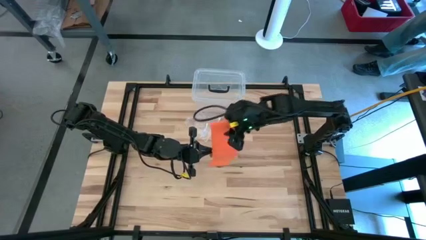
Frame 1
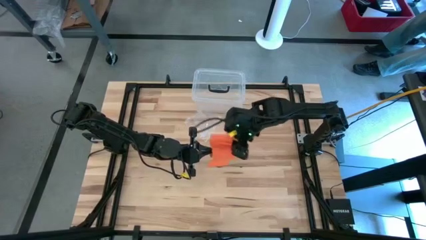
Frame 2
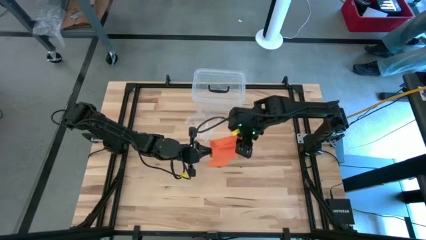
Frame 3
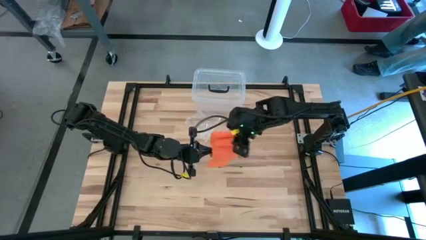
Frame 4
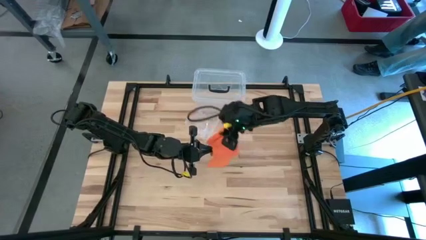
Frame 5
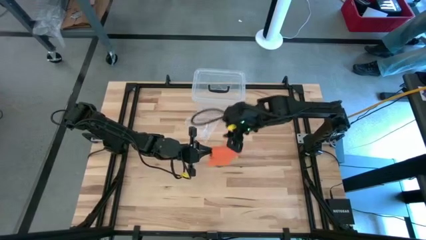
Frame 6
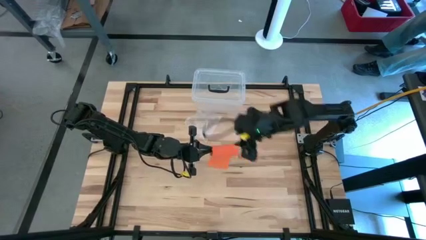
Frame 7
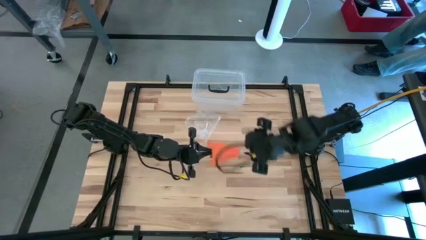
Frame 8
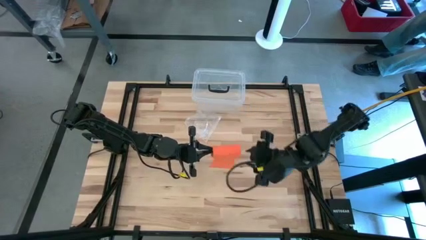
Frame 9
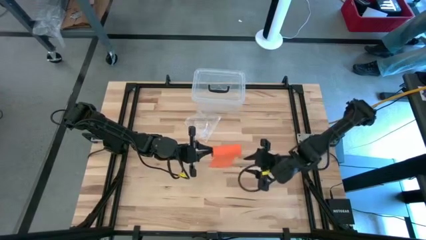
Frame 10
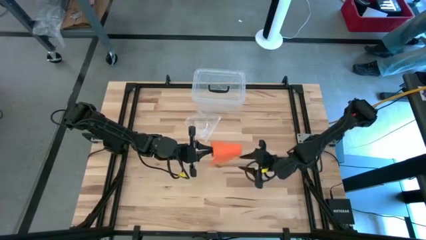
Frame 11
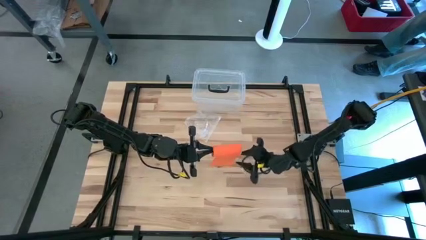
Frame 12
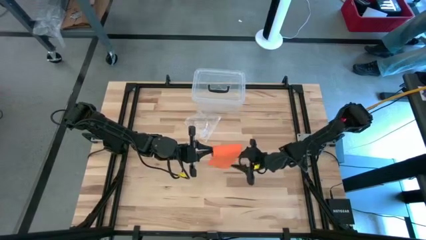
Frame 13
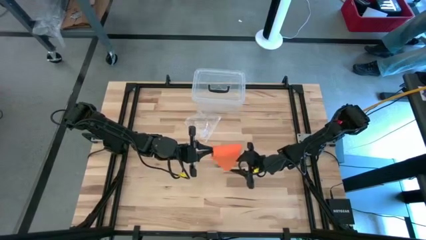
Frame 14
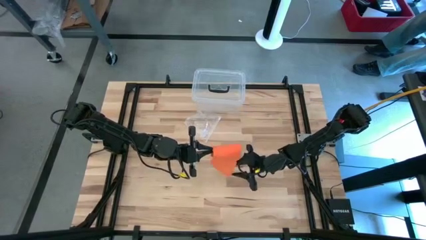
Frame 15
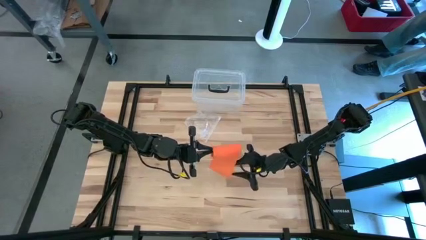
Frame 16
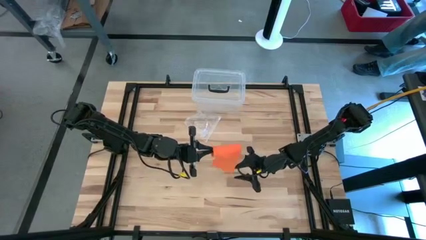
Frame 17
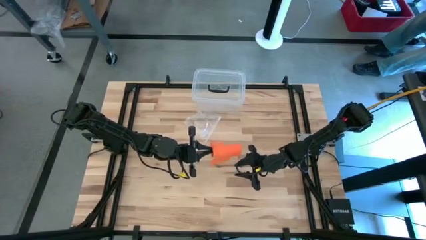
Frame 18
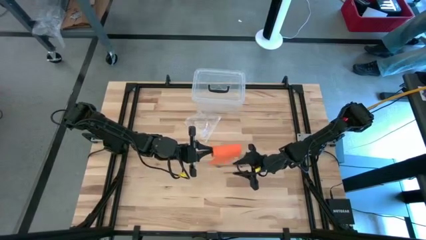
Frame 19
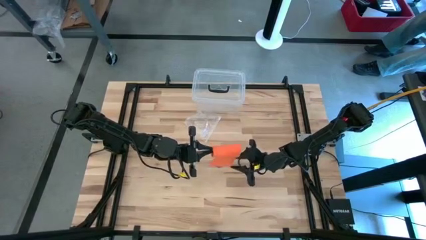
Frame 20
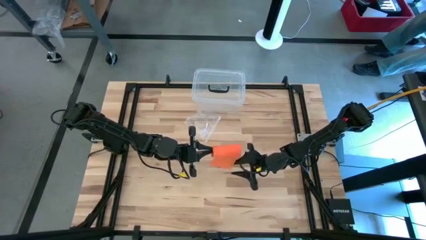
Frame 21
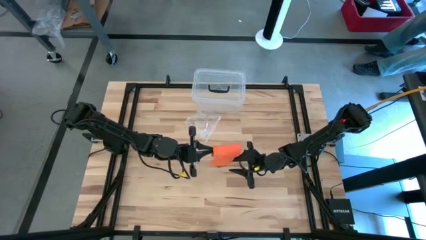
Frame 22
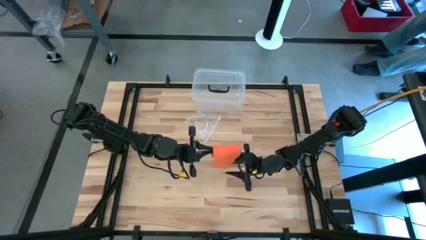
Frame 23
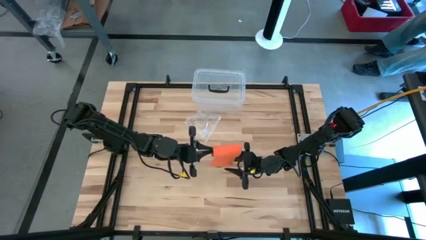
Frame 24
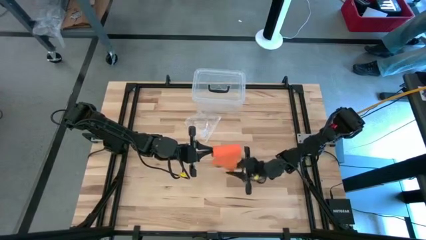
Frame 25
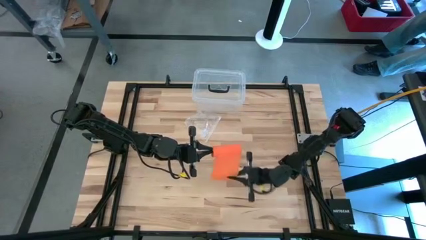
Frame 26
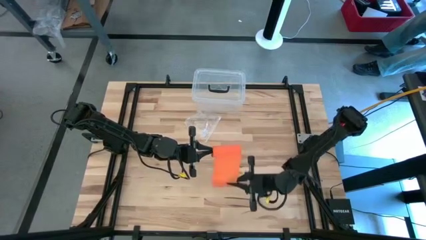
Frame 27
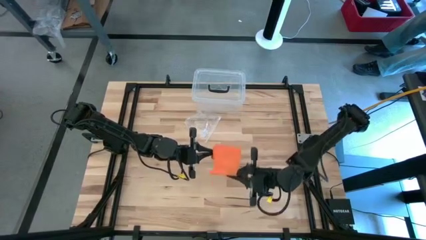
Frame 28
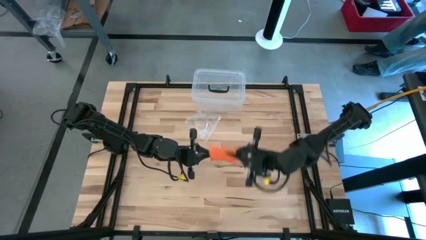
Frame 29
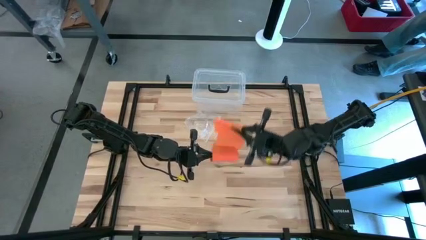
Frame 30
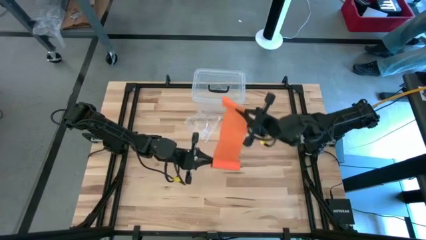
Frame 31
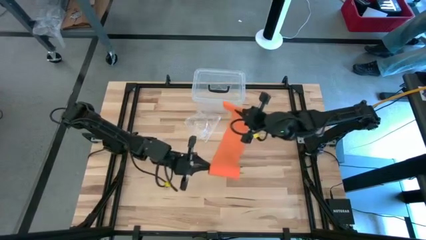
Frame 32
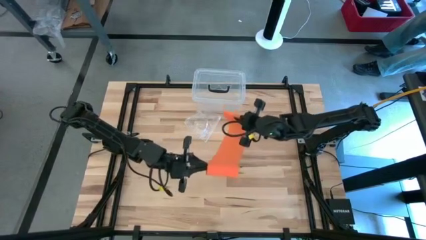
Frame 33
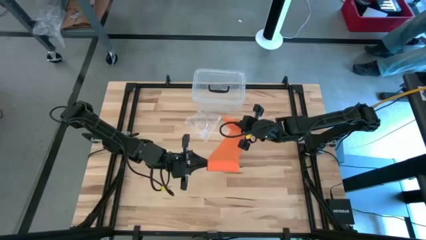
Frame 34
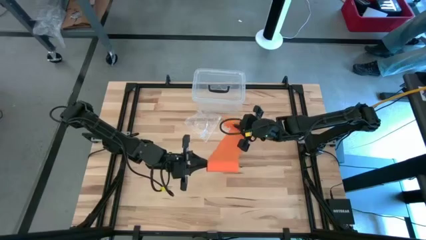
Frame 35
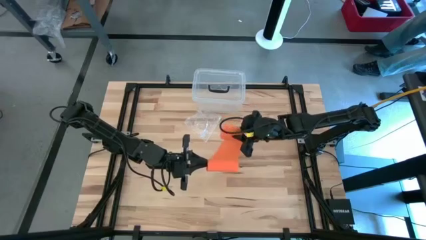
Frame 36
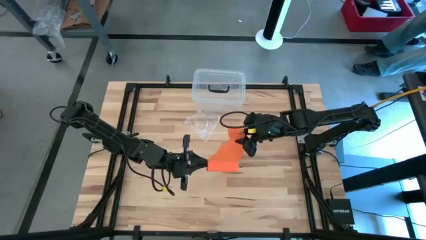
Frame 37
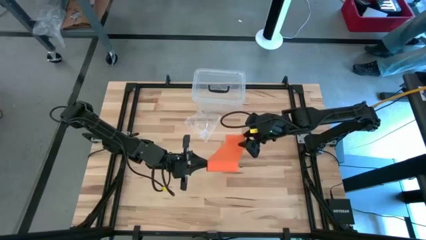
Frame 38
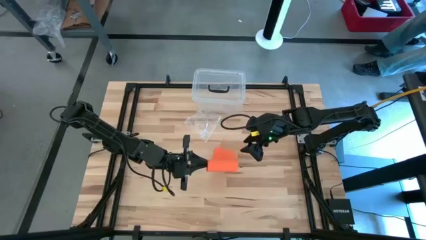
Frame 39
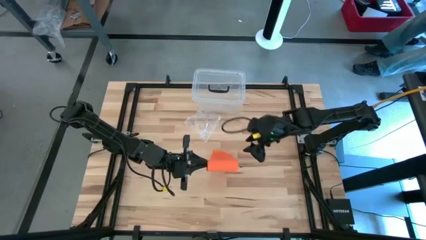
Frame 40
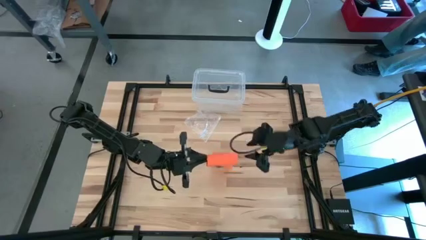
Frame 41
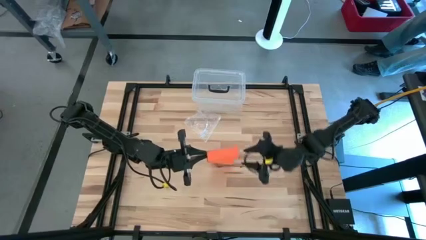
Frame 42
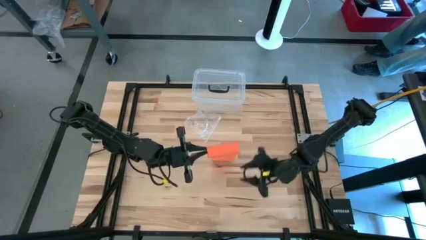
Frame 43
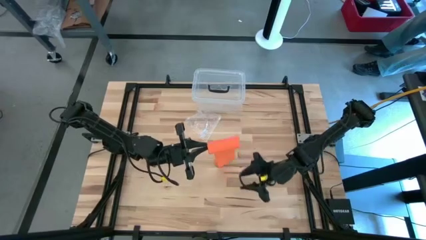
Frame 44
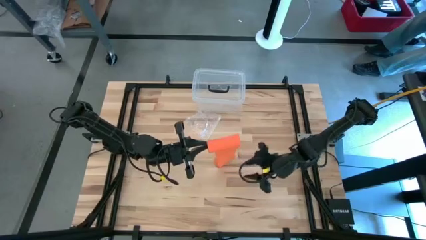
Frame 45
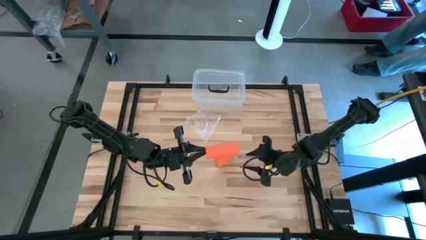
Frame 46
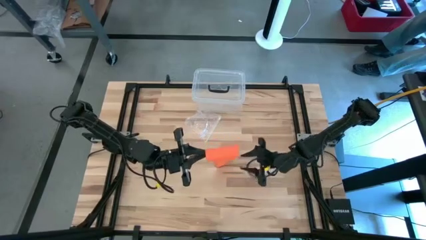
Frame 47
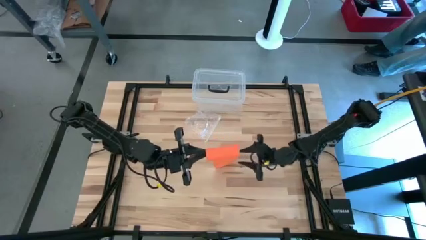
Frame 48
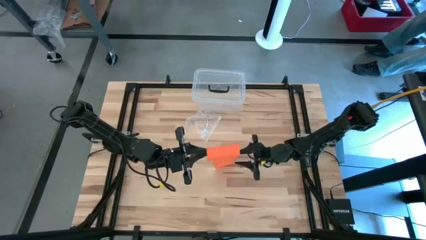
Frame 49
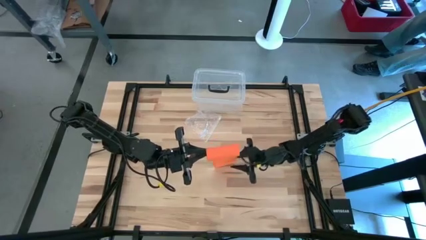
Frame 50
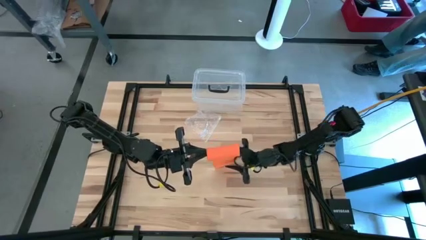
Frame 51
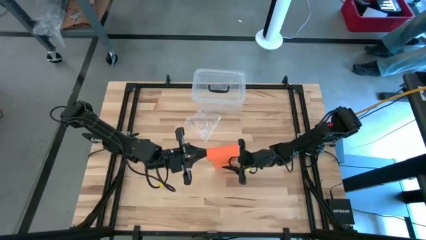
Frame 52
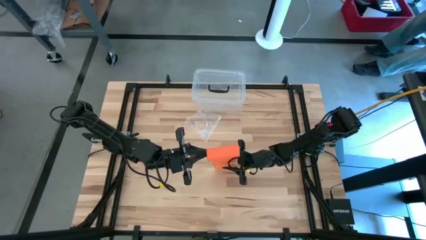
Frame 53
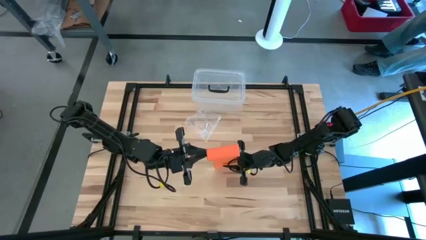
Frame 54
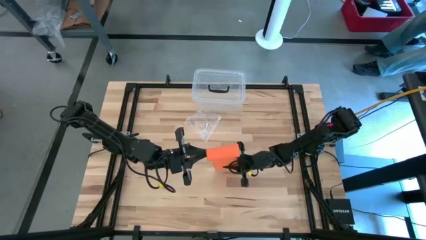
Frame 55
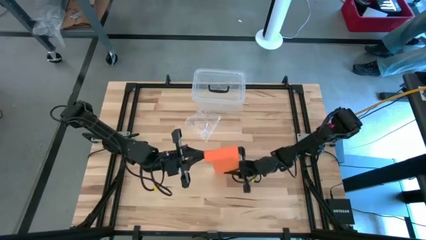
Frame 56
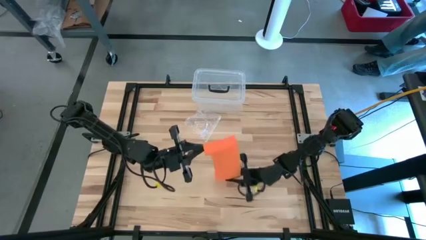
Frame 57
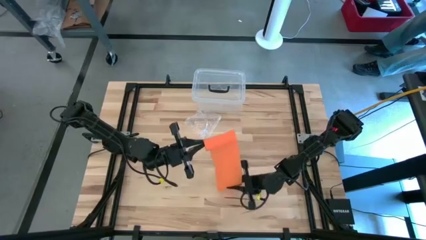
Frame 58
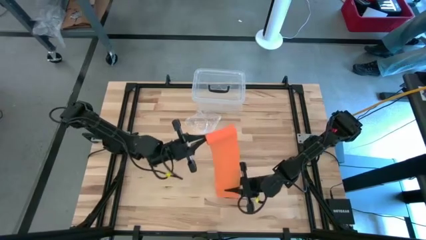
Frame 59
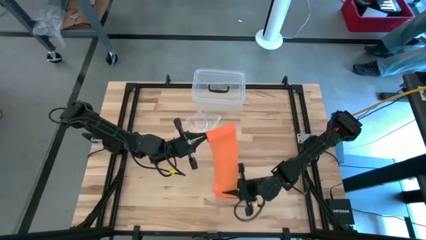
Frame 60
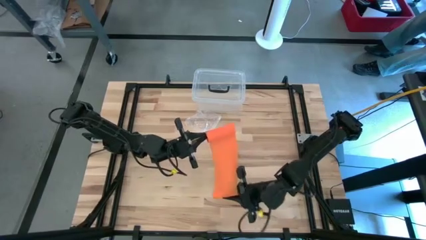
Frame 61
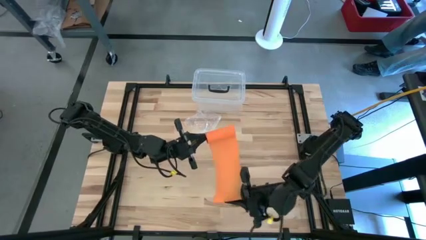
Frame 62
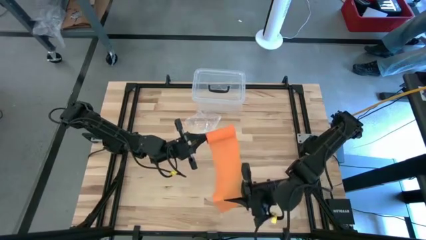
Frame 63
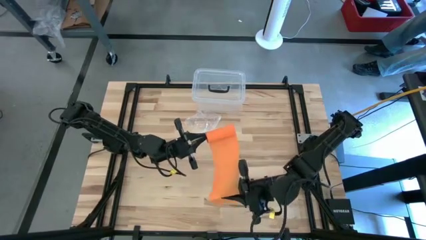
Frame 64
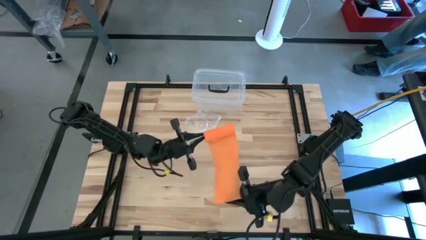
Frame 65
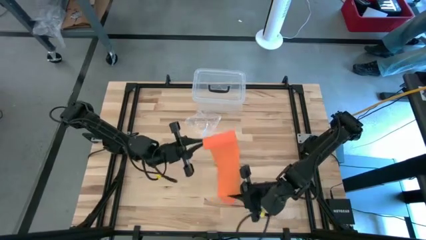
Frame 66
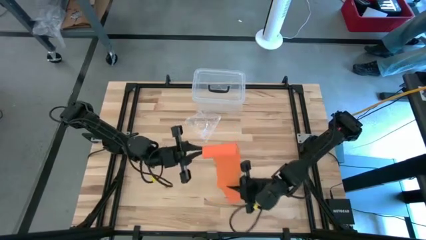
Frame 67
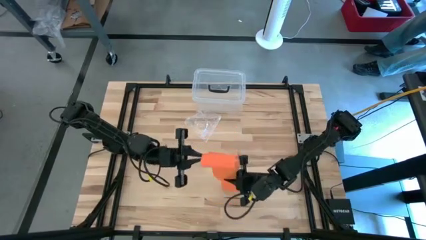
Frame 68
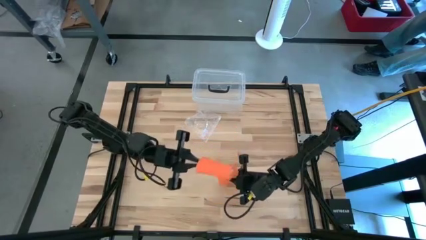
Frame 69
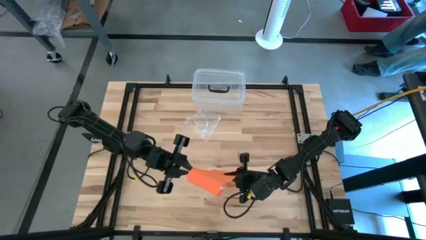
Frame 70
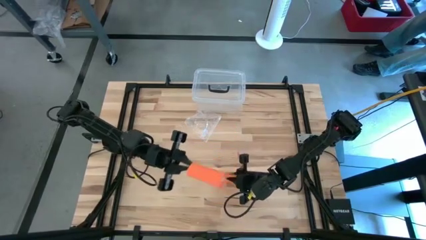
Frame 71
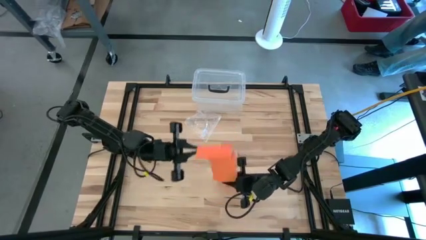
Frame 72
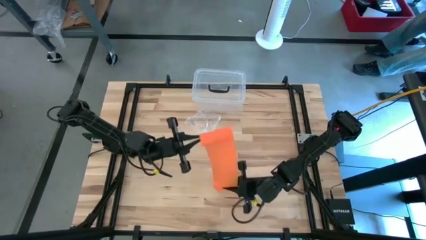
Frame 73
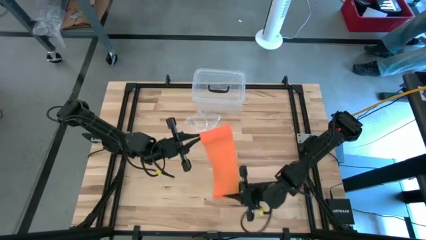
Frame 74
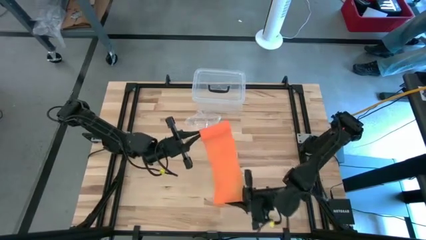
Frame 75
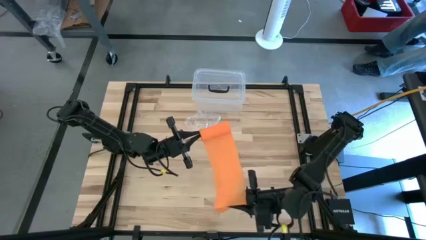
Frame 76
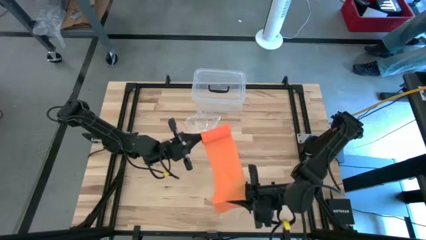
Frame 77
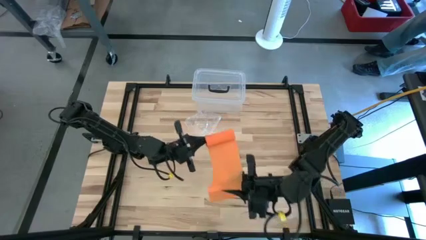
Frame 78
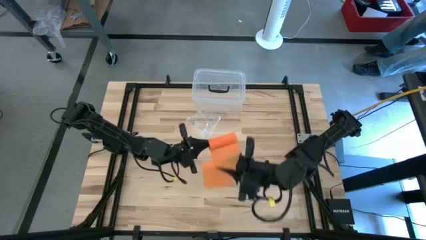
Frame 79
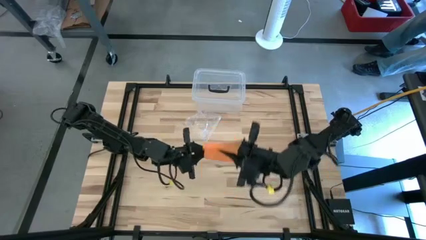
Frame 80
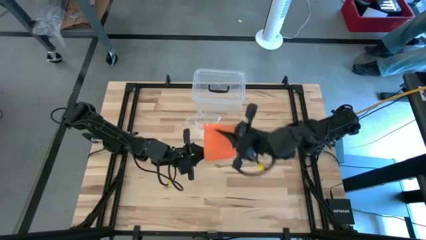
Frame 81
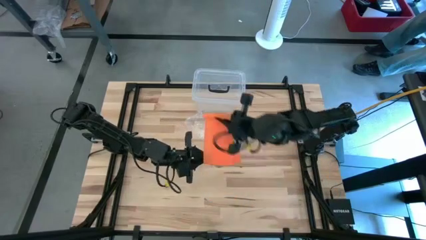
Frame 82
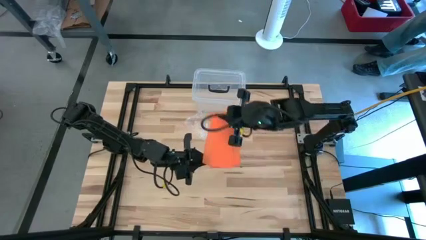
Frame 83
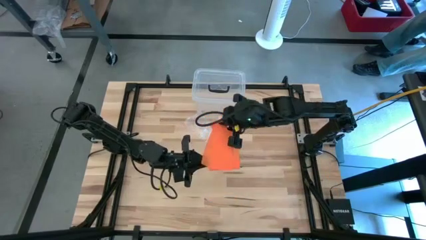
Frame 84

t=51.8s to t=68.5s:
Task: Roll bandage
Roll the orange bandage
